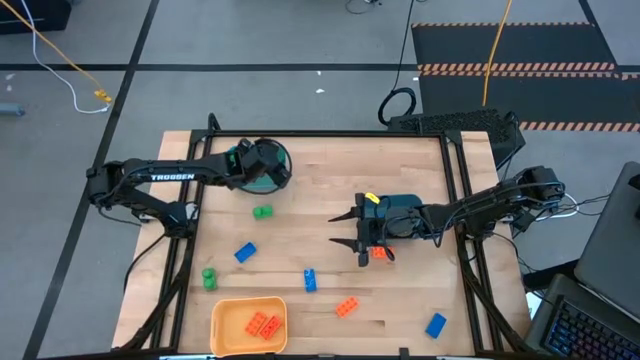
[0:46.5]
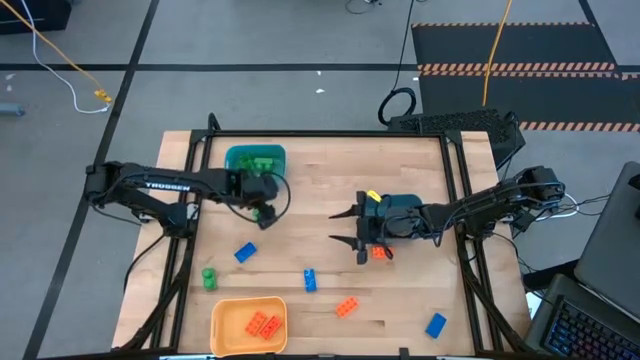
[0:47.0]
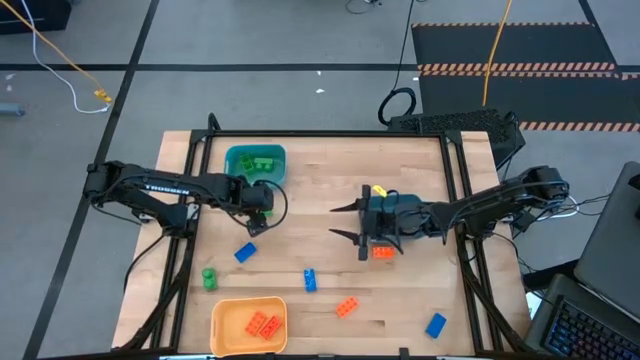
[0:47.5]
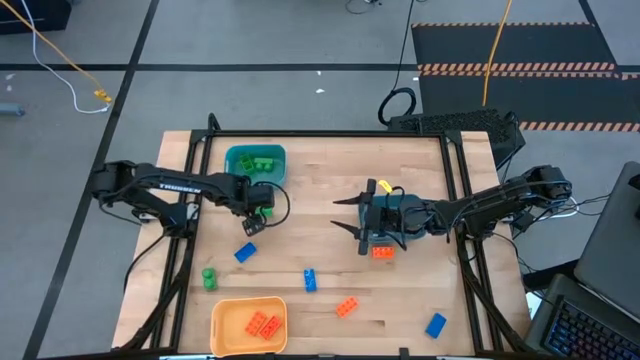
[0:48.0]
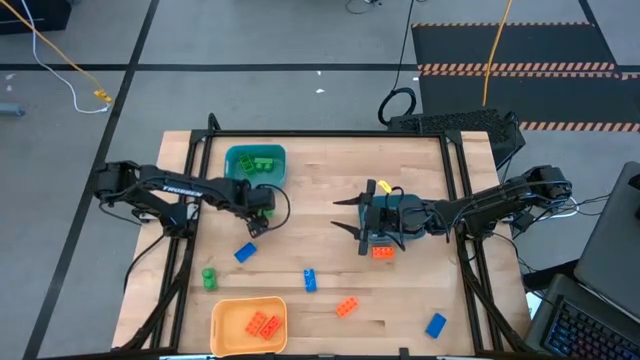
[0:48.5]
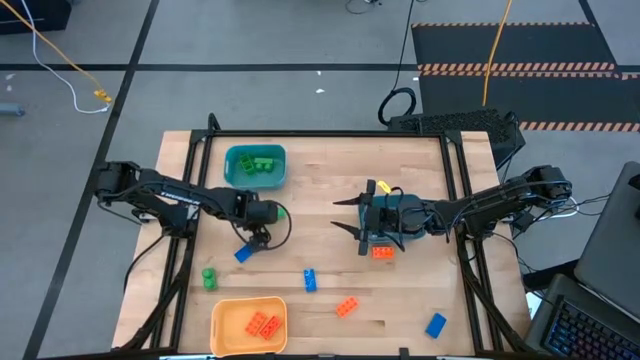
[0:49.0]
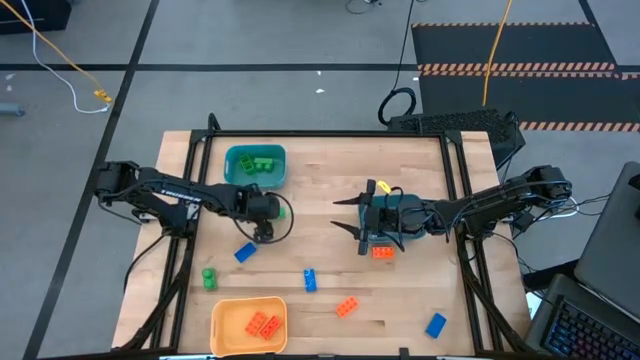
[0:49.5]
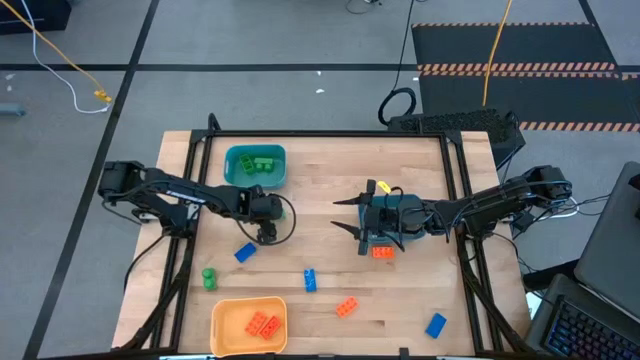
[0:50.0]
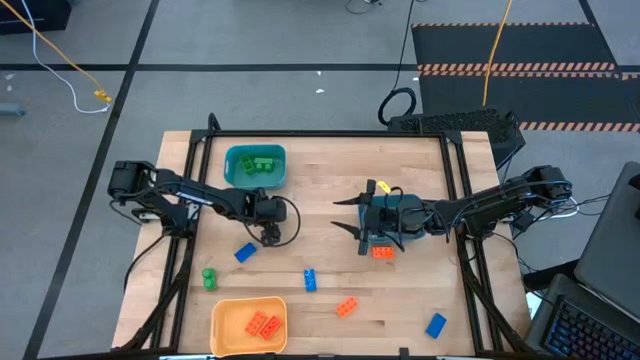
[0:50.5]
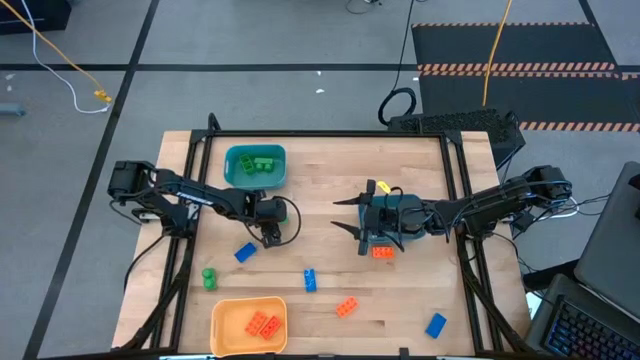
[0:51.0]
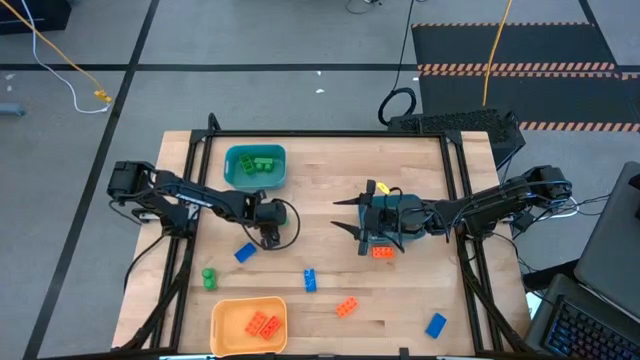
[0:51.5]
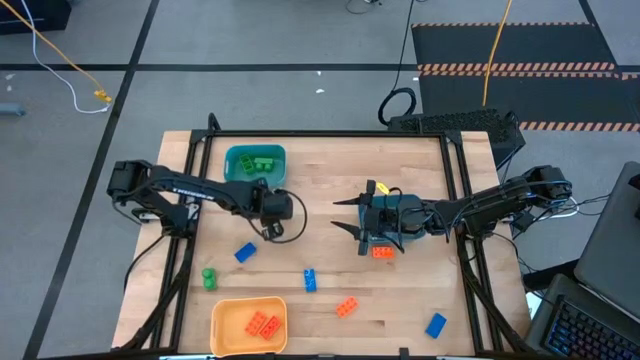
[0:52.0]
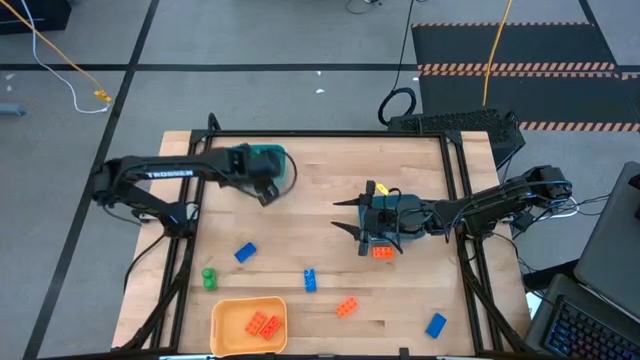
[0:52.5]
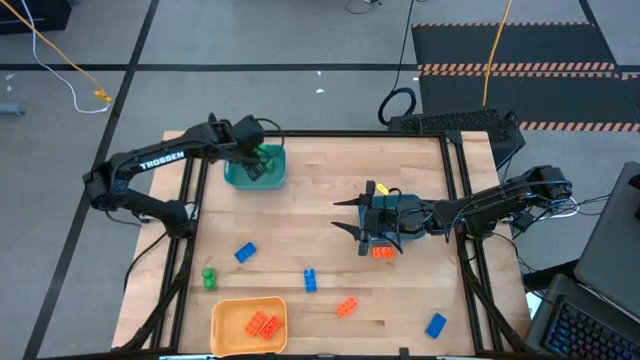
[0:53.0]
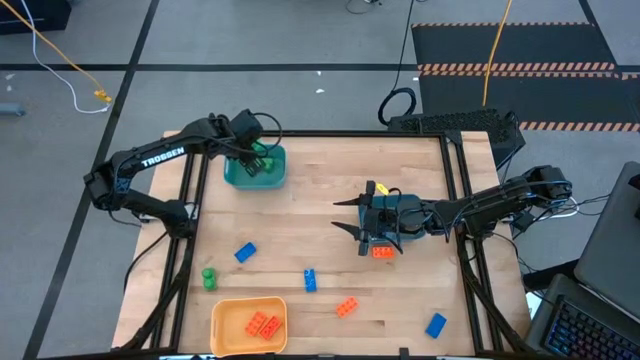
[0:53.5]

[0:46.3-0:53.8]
Task: Sort & place blocks by color
Put the green game piece into the light blue bin

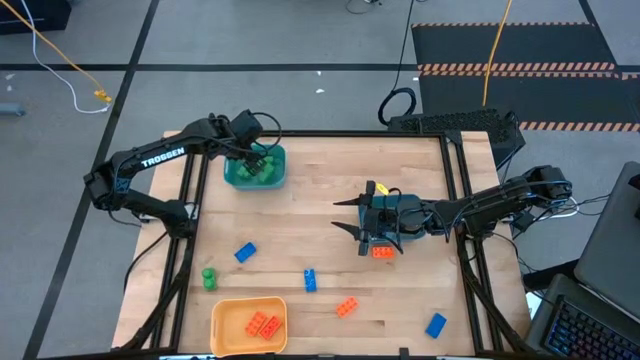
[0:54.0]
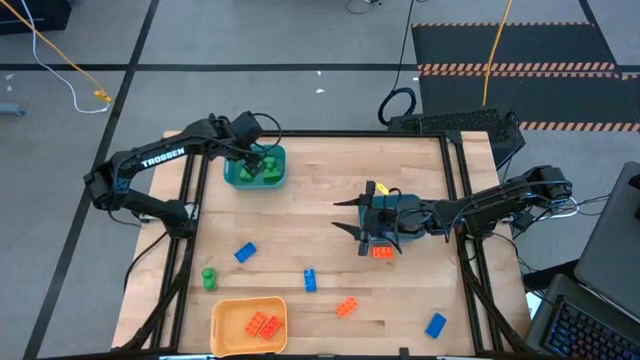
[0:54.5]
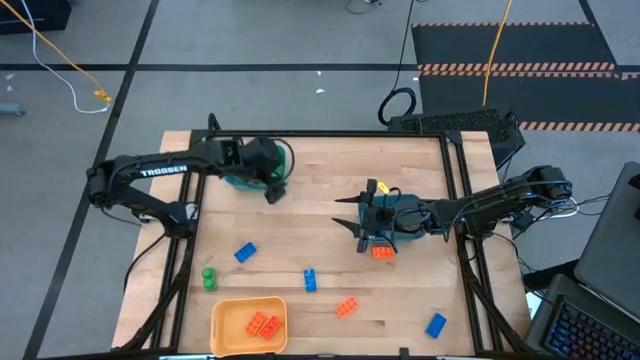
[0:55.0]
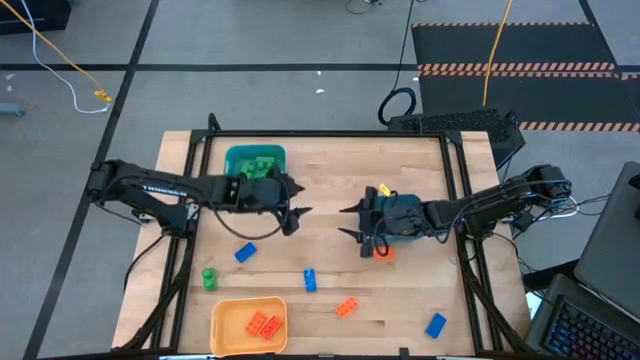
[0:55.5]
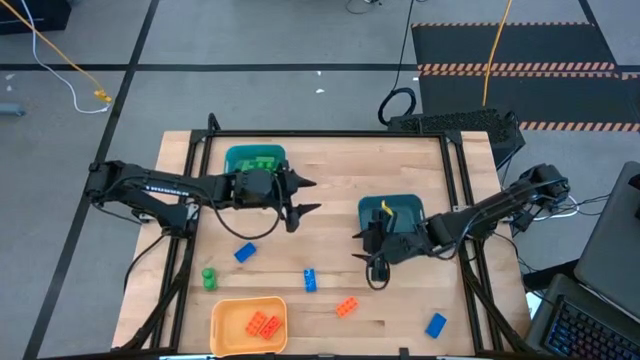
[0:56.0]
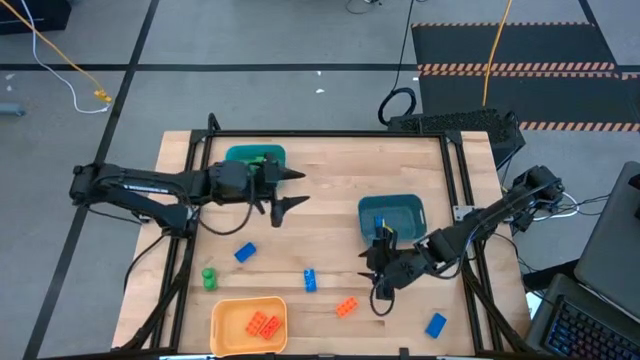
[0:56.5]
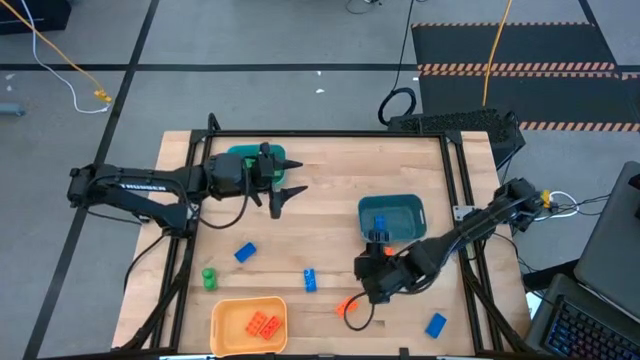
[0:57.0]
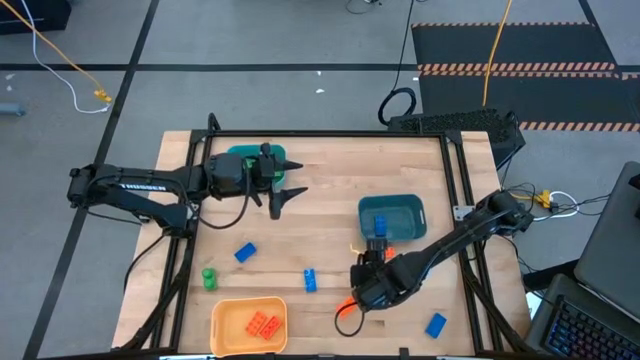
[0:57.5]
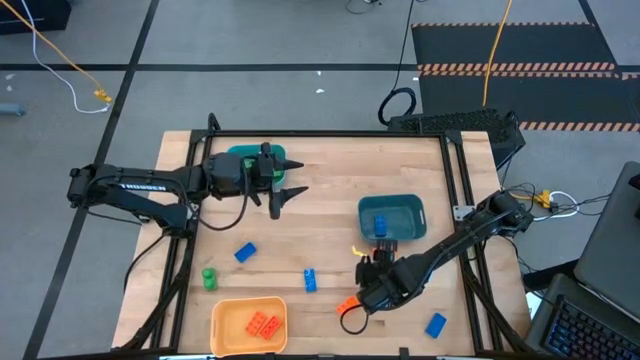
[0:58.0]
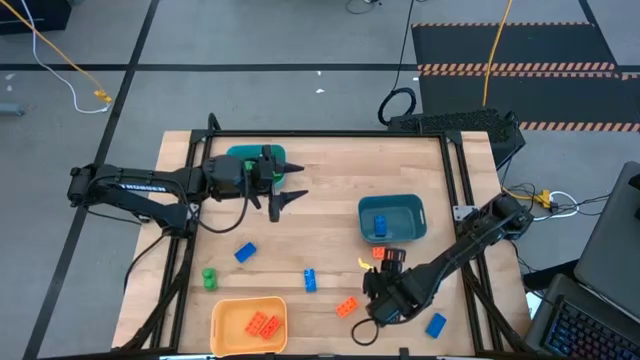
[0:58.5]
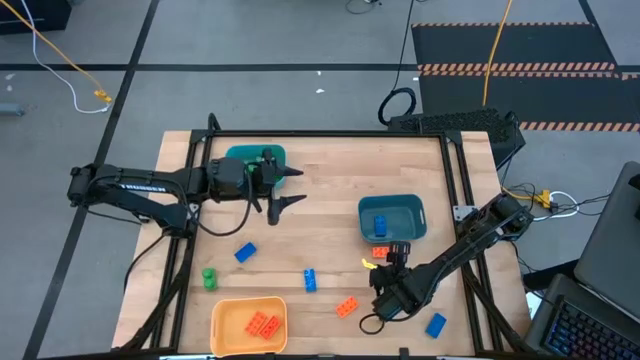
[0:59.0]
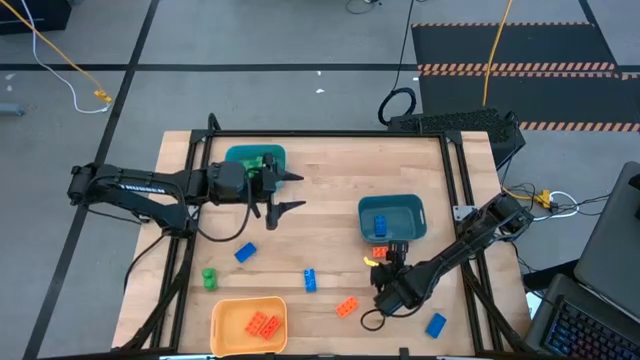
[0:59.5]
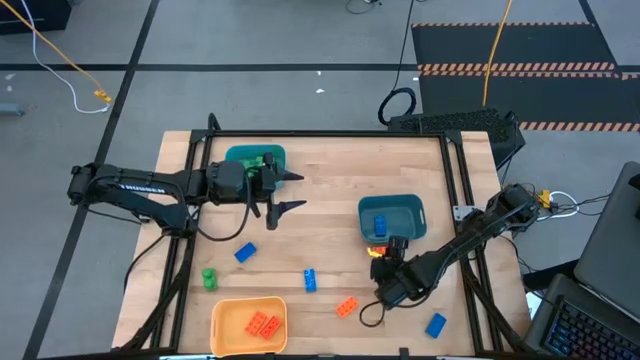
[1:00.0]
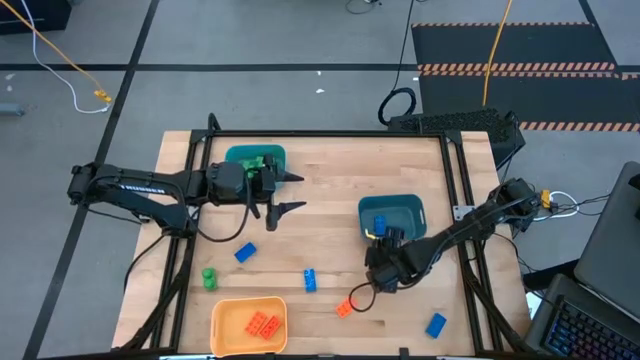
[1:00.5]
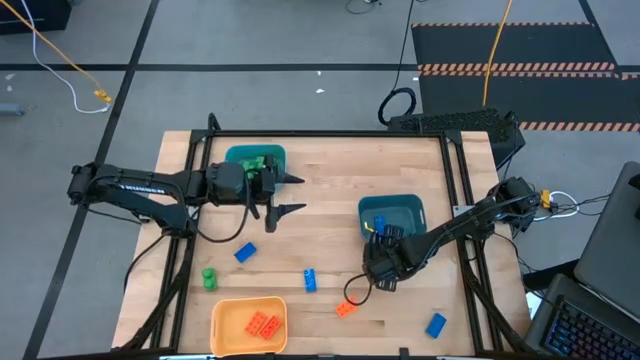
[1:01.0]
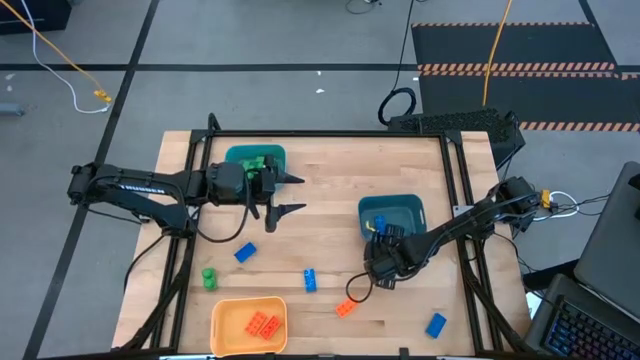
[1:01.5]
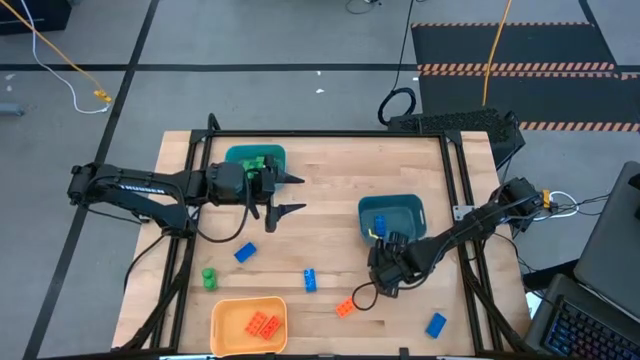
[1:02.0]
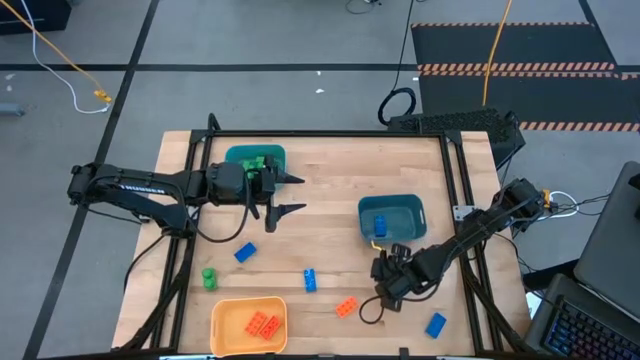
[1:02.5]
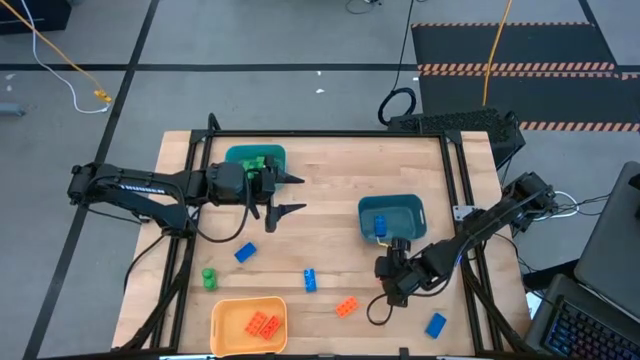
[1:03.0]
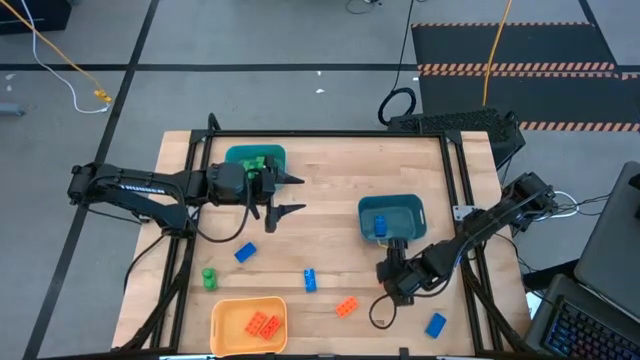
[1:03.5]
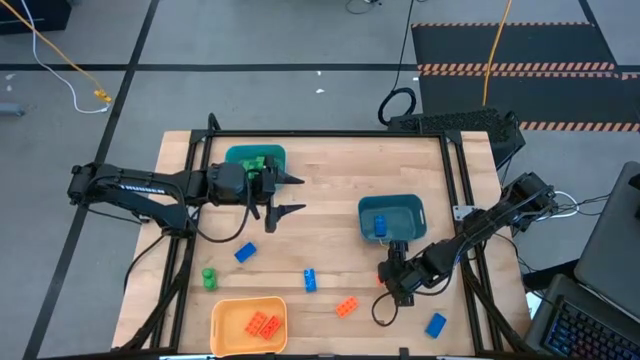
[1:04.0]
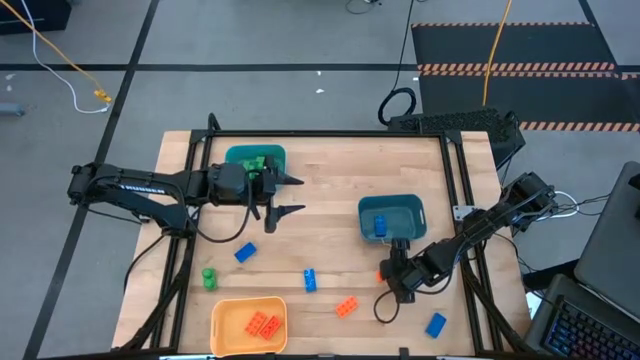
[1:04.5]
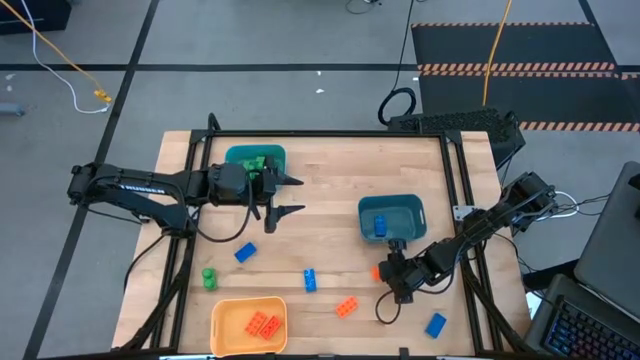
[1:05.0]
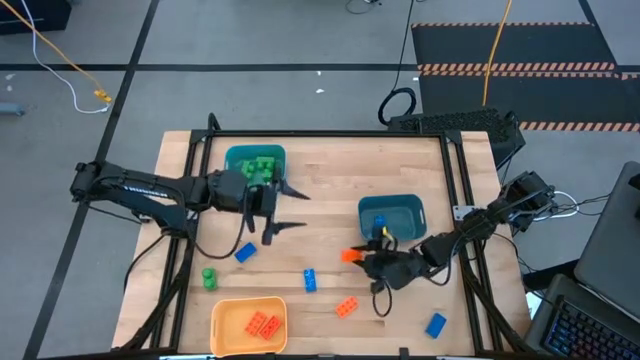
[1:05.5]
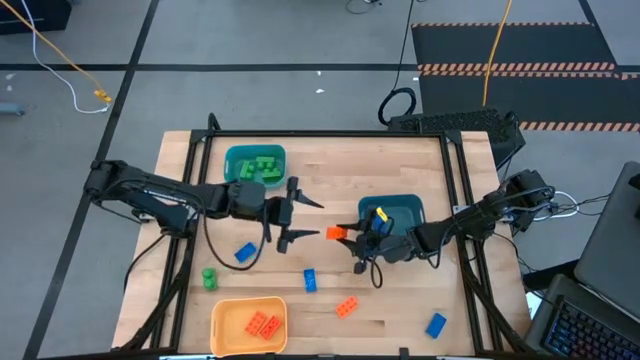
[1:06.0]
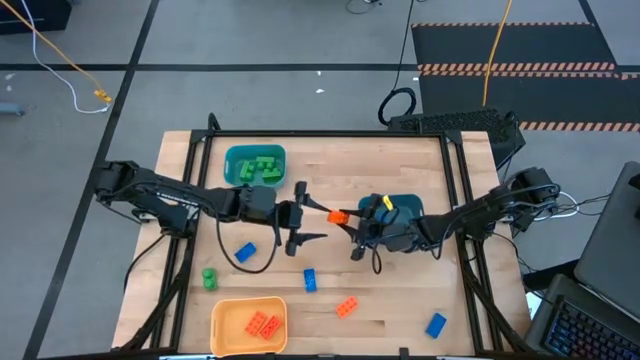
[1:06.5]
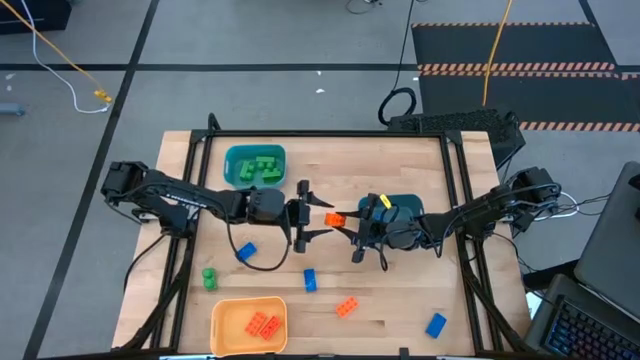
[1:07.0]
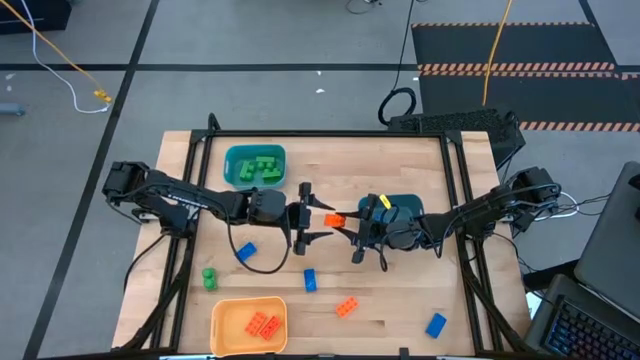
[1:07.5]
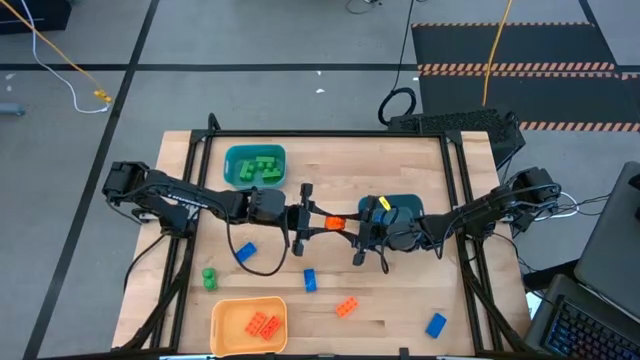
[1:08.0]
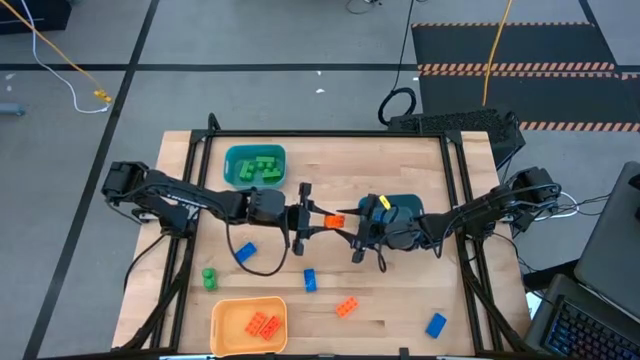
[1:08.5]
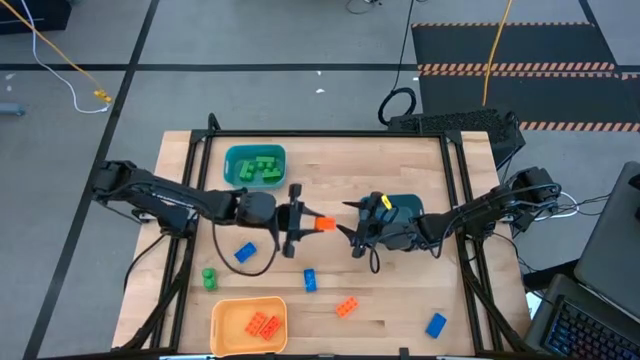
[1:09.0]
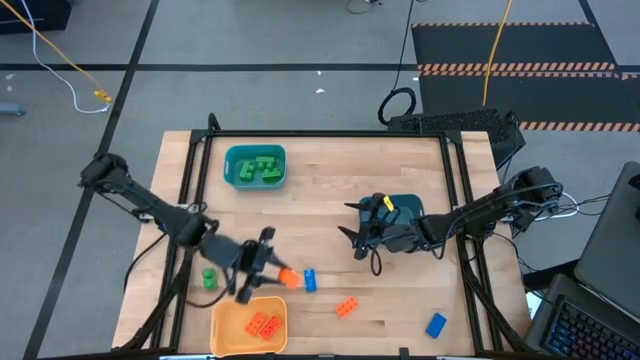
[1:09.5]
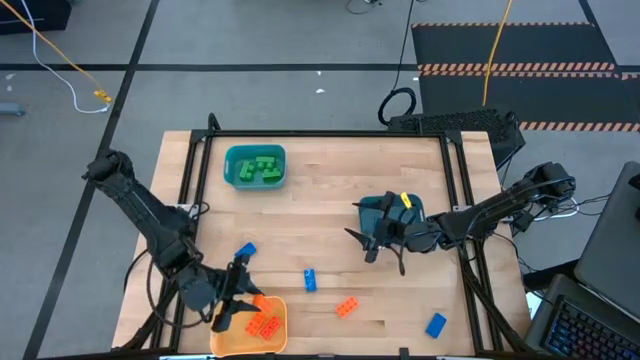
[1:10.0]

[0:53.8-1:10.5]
Put the orange game piece into the yellow bin
